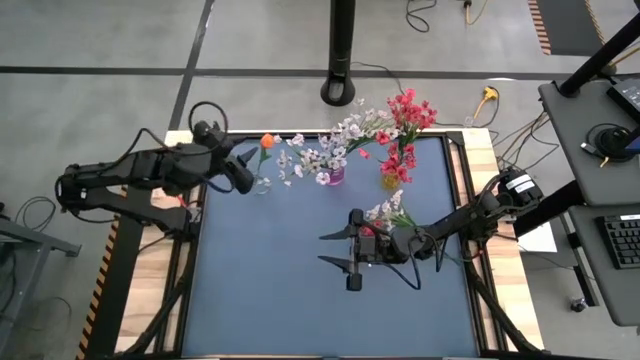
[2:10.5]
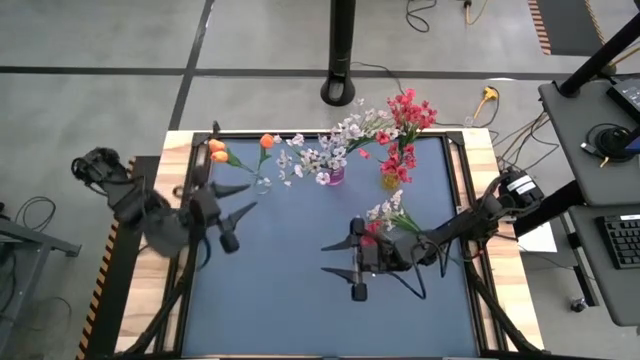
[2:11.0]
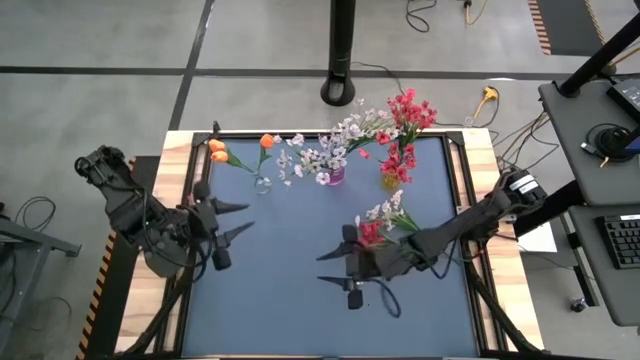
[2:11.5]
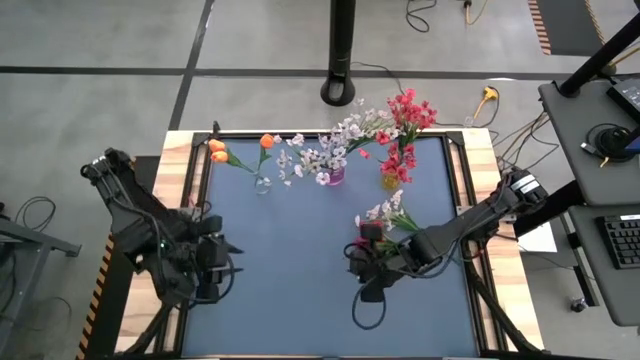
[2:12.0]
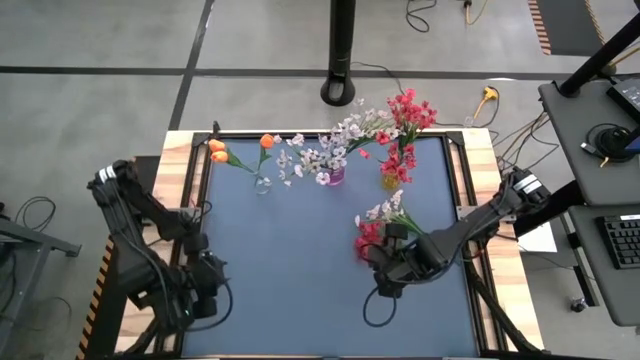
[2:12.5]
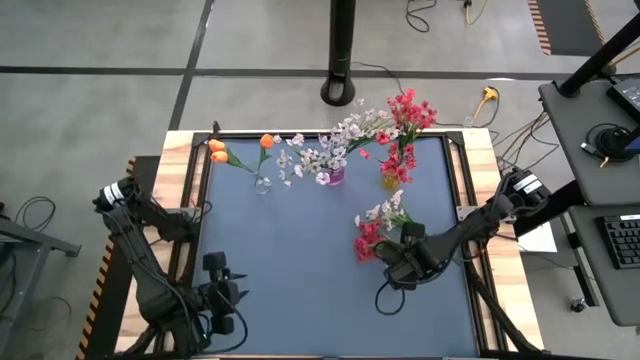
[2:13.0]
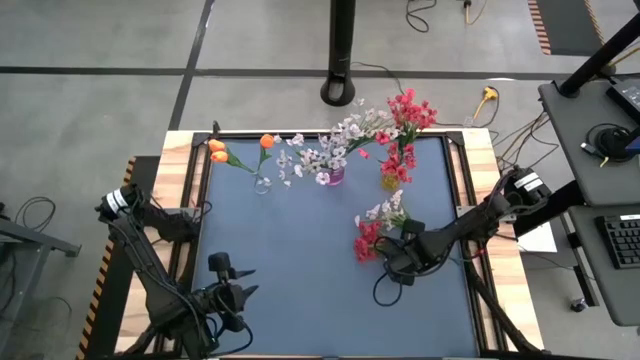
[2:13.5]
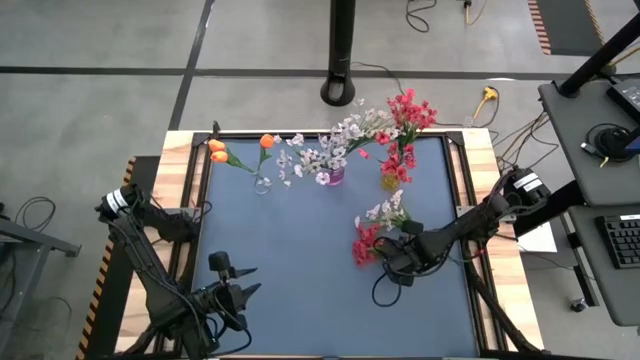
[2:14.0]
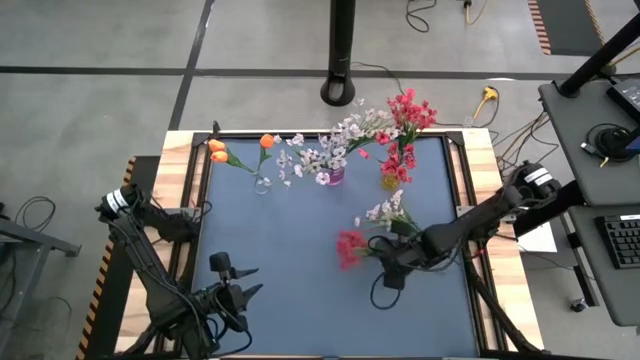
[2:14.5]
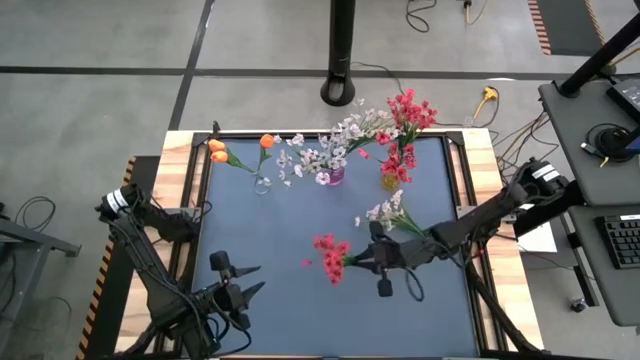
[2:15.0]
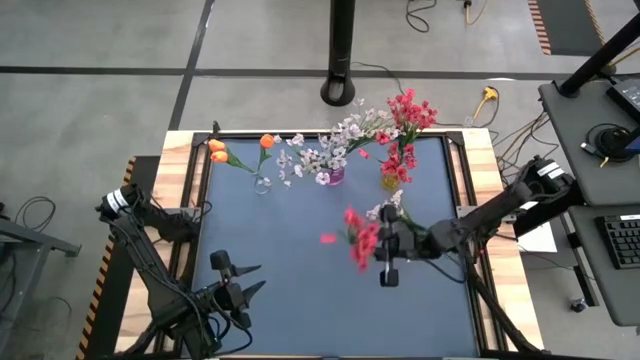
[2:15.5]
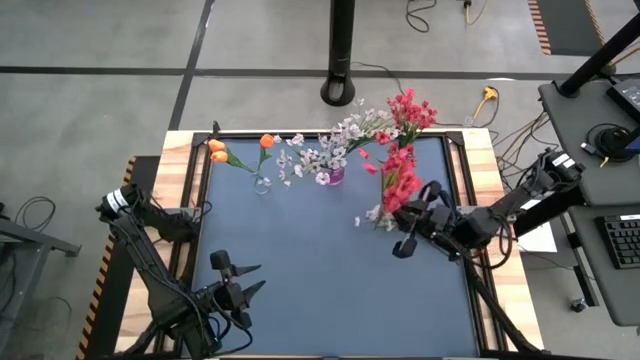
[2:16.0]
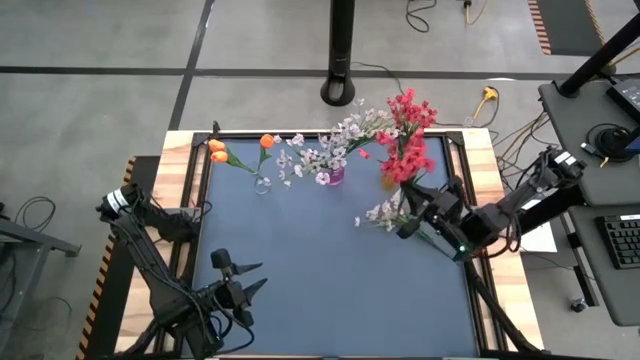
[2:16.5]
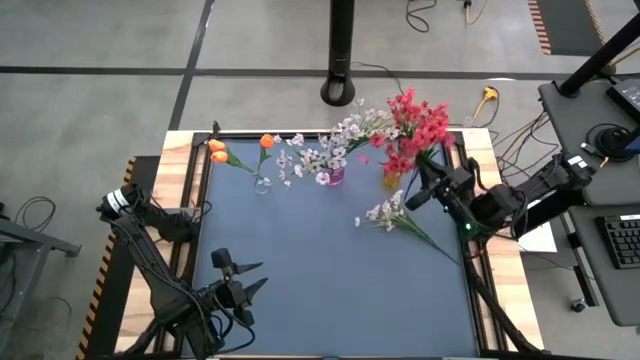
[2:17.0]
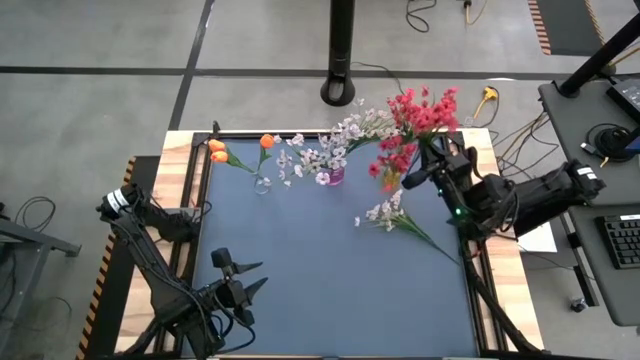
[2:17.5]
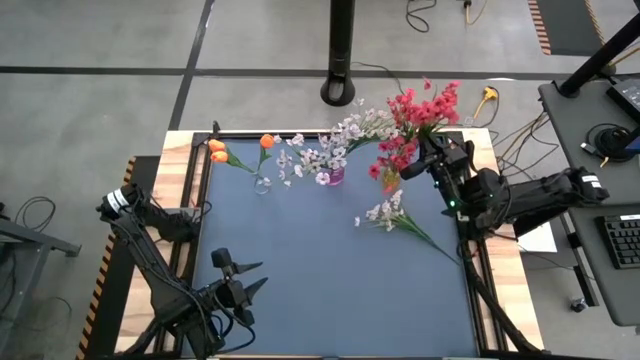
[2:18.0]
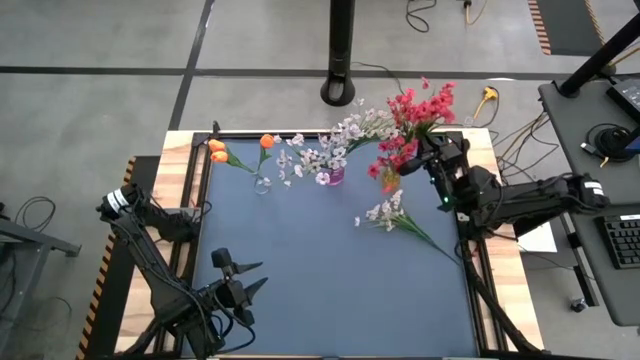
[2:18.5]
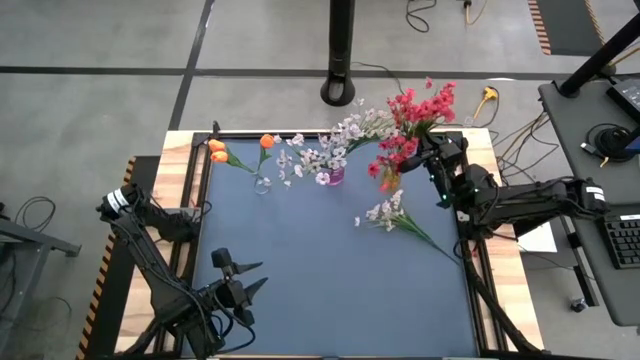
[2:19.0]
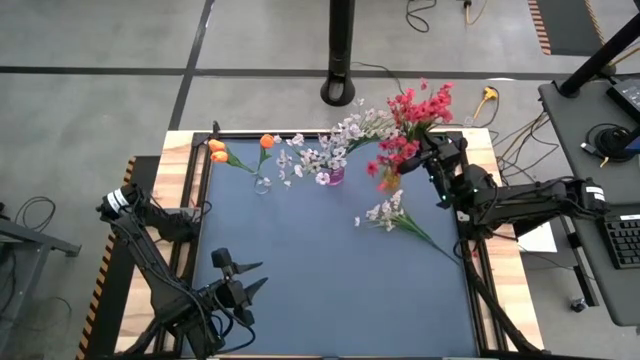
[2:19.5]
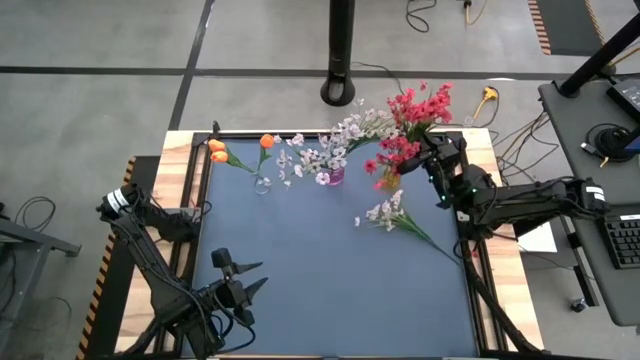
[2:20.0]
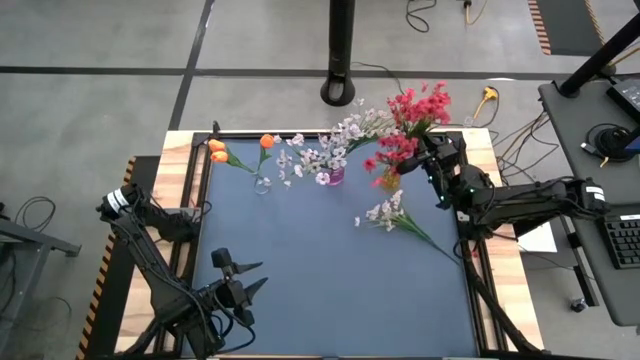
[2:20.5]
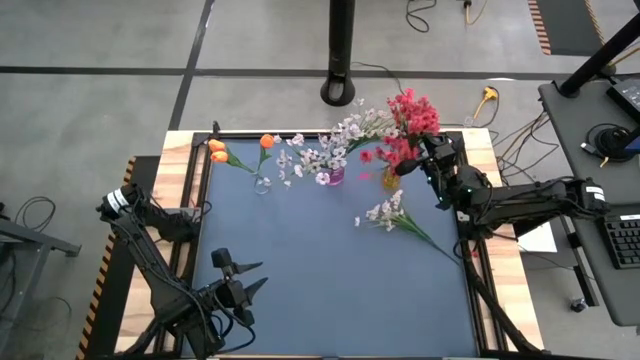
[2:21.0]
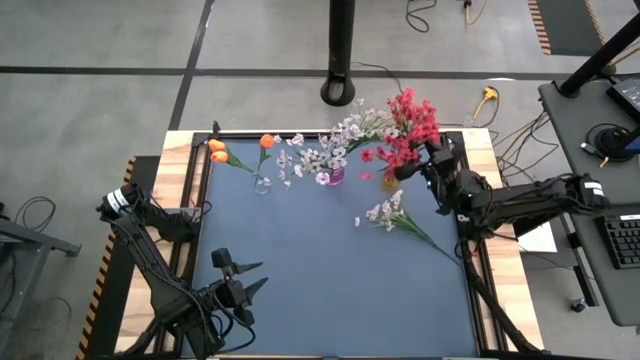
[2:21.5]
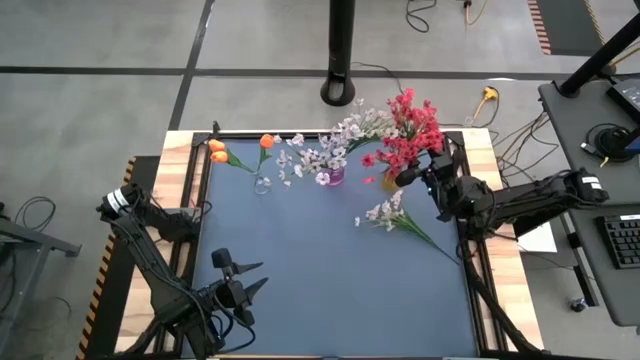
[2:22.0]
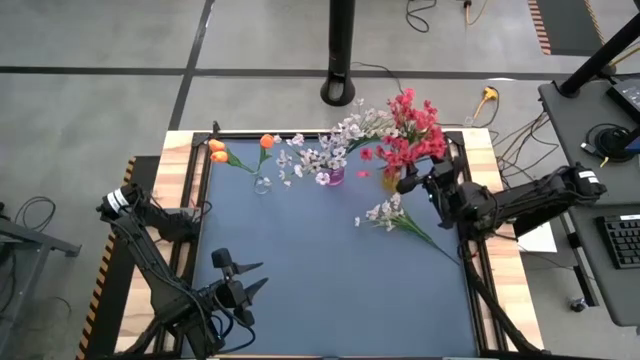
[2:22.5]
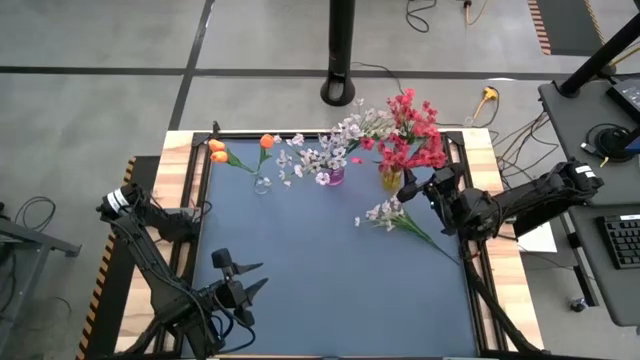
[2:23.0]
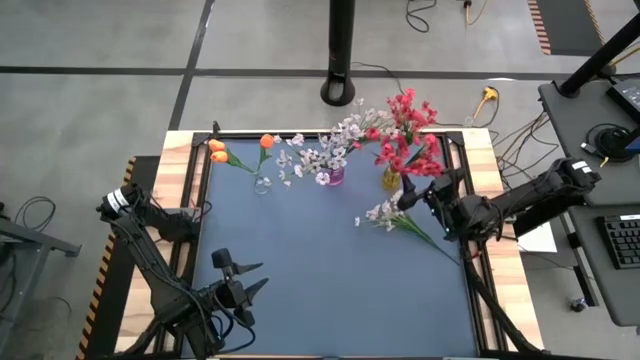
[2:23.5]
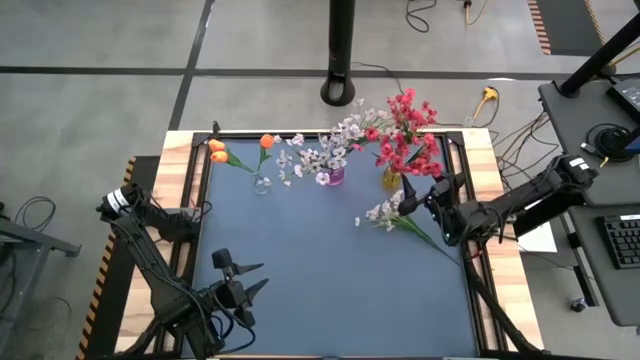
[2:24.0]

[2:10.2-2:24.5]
Task: Sort flowers into vase by color
Put the red flowers into the yellow vase

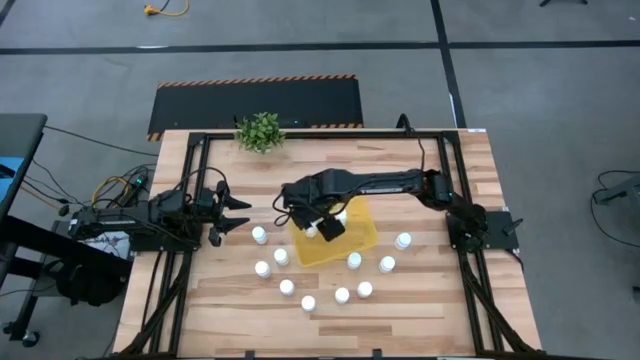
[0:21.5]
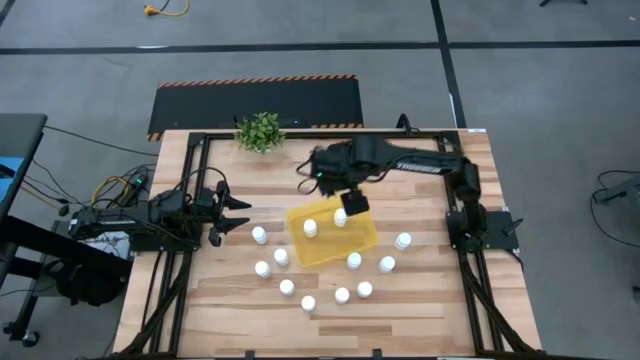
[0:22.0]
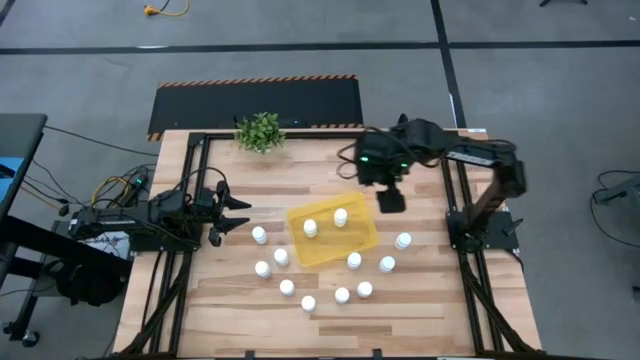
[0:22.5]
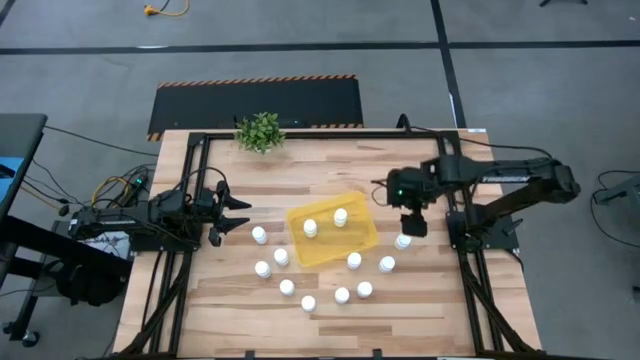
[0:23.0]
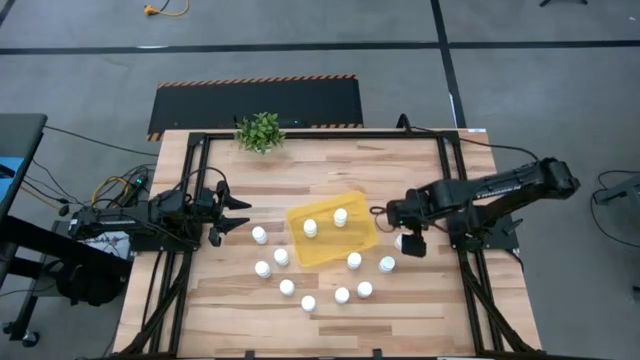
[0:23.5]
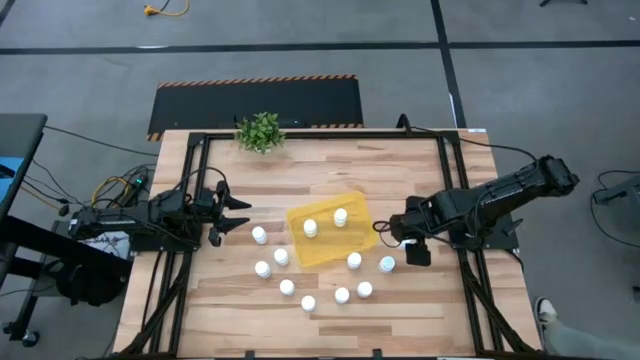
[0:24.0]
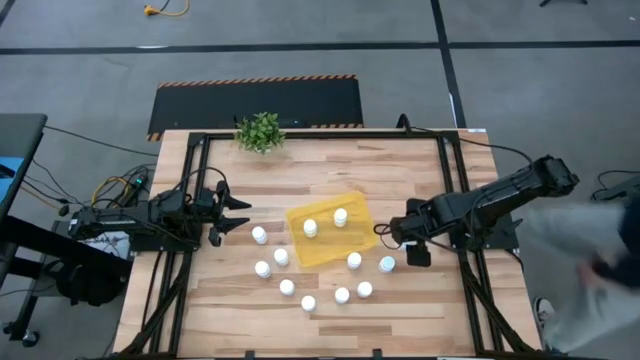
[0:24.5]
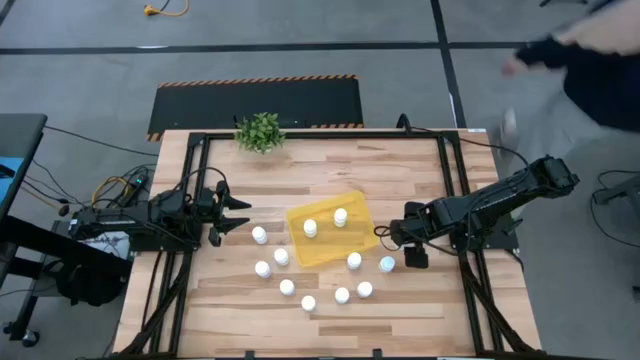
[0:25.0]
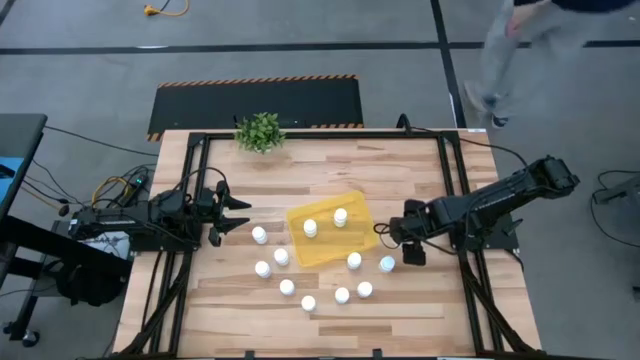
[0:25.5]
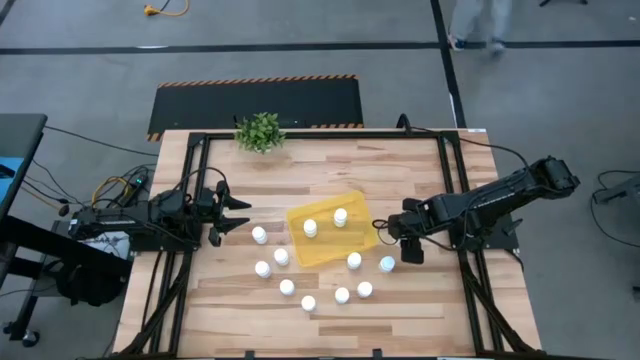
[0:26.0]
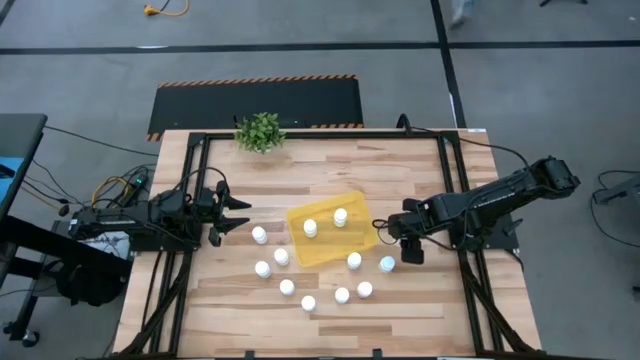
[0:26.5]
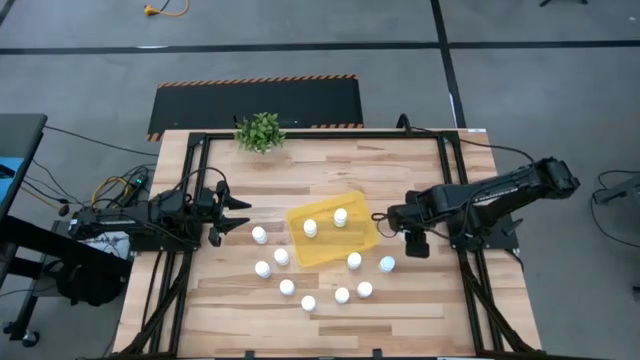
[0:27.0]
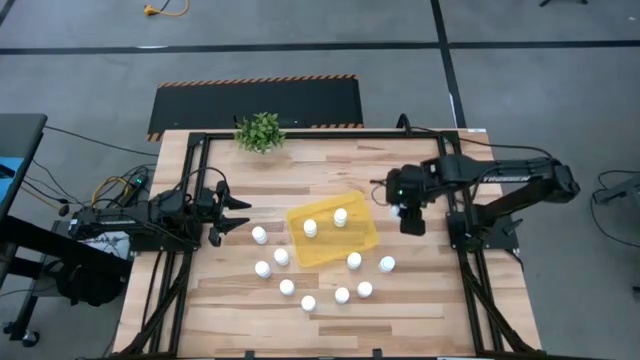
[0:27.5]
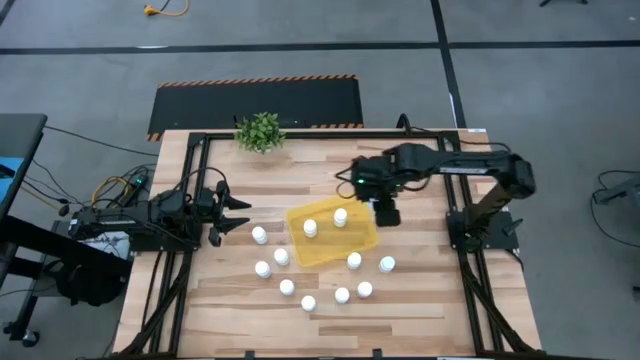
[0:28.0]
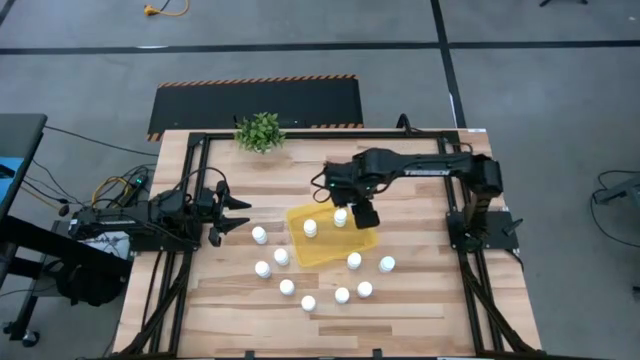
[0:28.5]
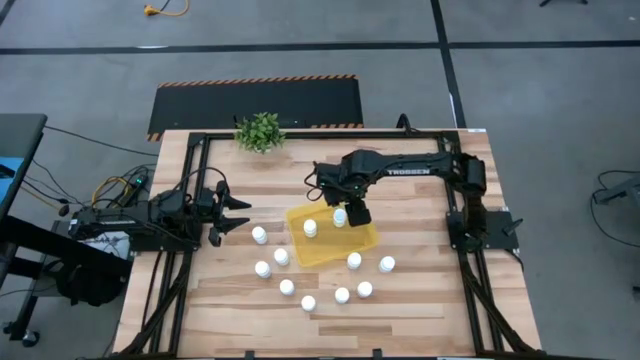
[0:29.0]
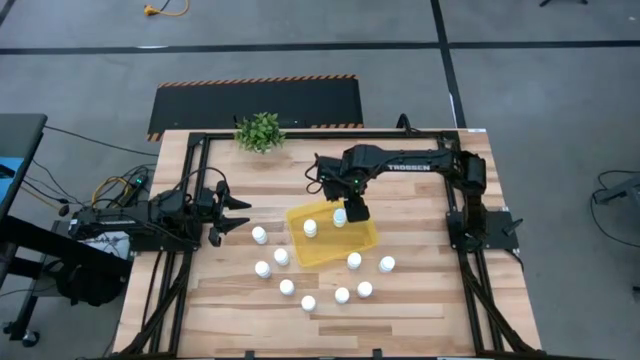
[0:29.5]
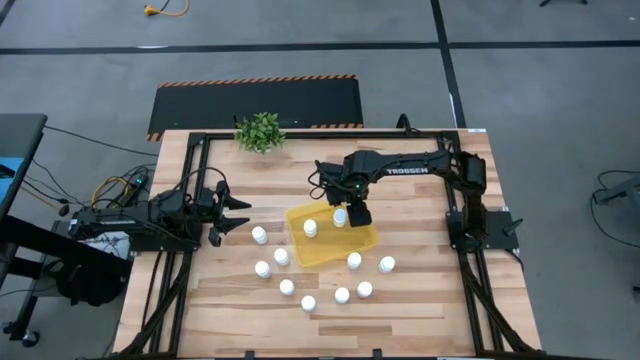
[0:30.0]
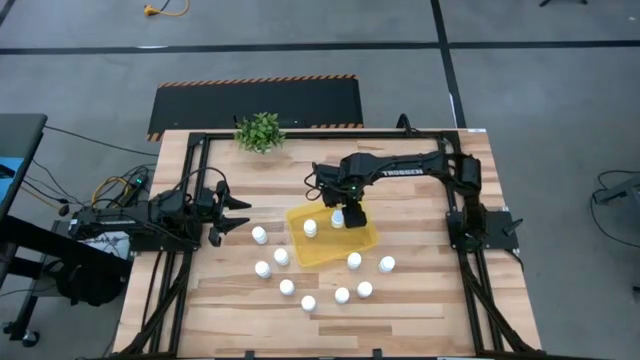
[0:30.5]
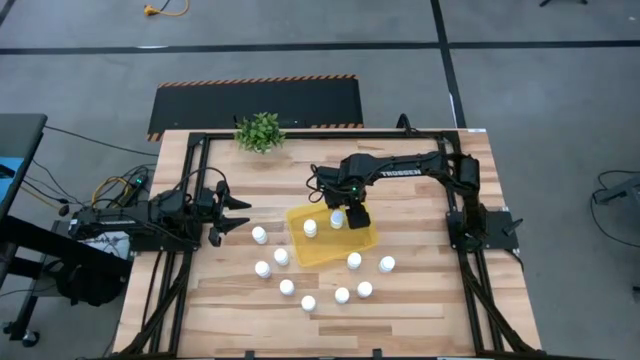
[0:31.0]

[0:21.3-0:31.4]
Task: Pick and place pill bottles into a basket
Put the white pill bottle into the yellow bin
